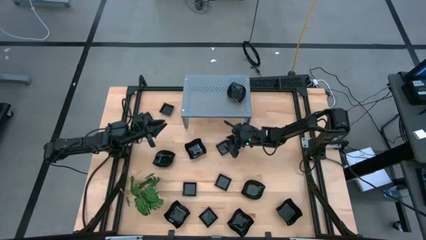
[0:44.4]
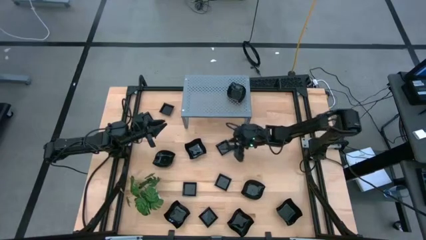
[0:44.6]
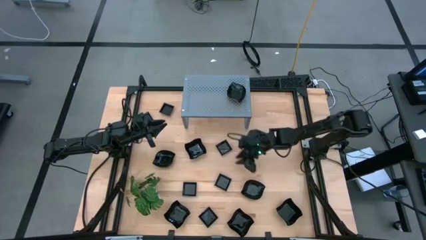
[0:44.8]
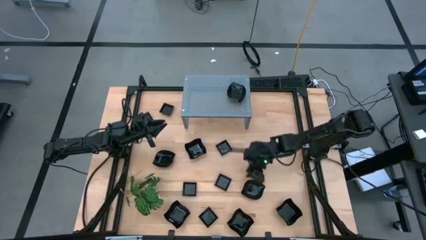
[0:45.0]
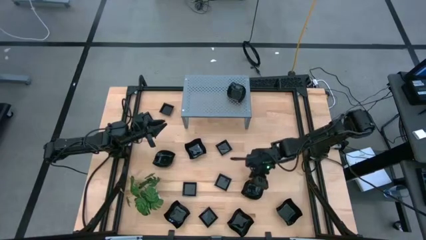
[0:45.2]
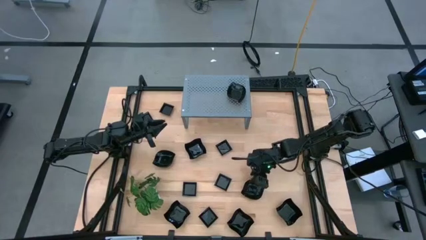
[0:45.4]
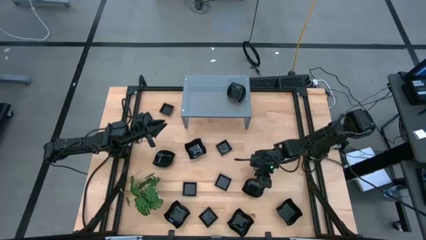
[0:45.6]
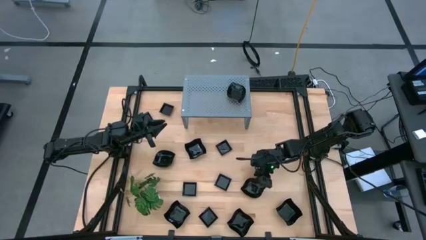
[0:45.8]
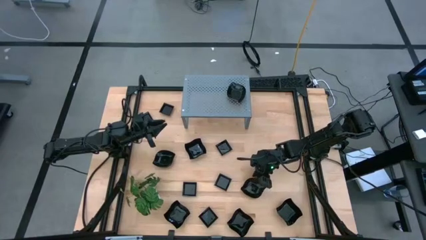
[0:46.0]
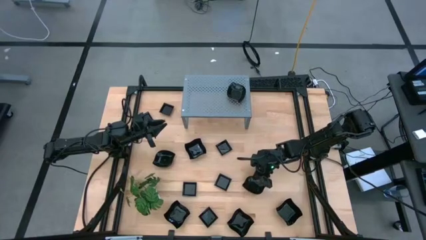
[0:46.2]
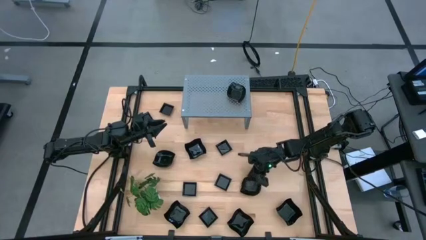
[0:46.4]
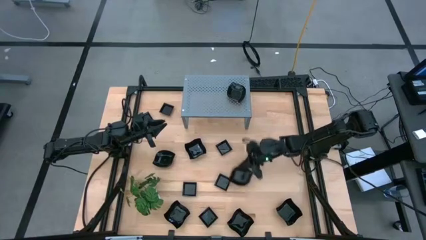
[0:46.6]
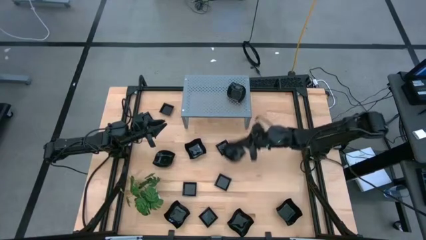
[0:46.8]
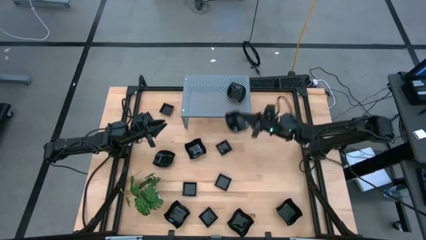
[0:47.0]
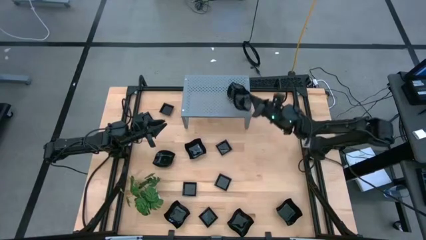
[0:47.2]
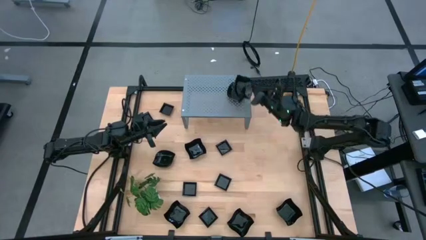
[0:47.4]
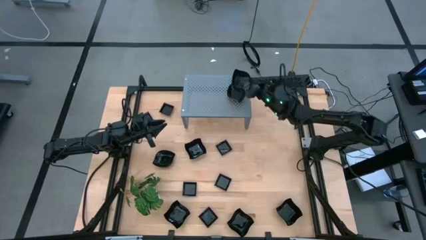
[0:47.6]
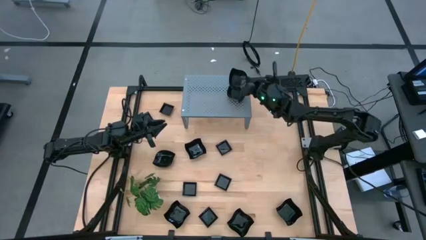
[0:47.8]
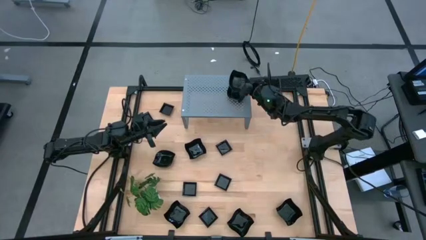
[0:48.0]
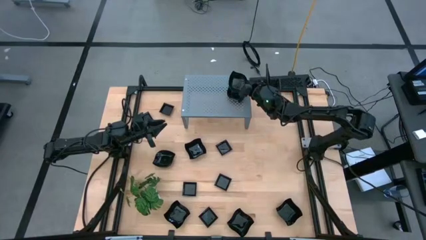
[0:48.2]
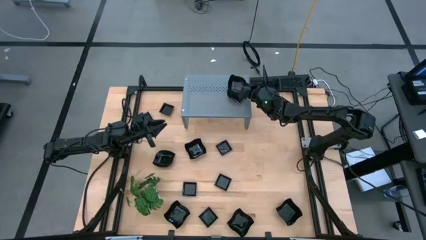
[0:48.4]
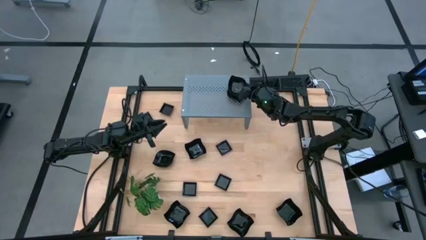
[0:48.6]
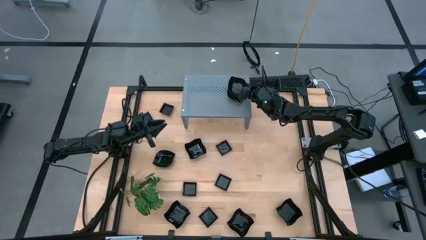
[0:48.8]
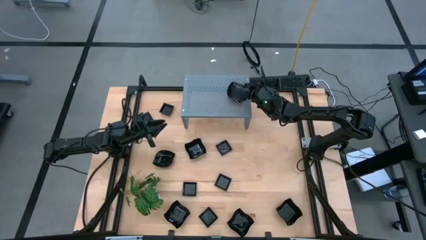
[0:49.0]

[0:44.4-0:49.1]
Task: Pick & Place Mini shaped plates
Stack the black leaf shaped plate on top of the black leaf shaped plates on the shelf

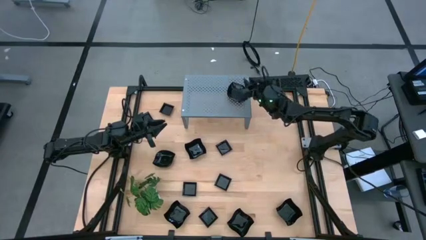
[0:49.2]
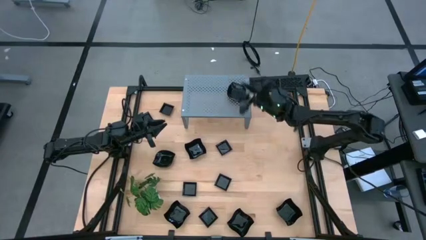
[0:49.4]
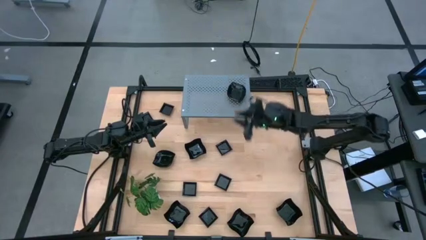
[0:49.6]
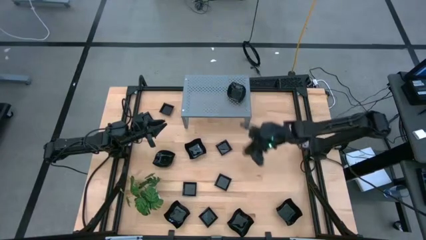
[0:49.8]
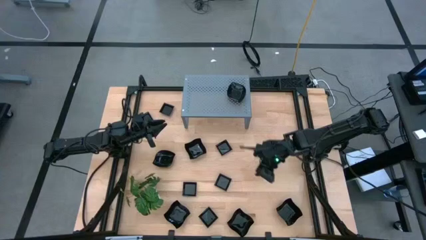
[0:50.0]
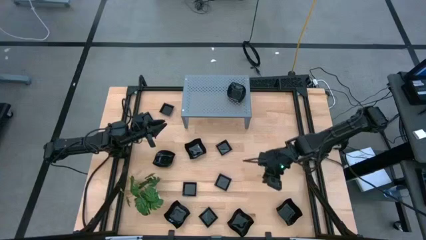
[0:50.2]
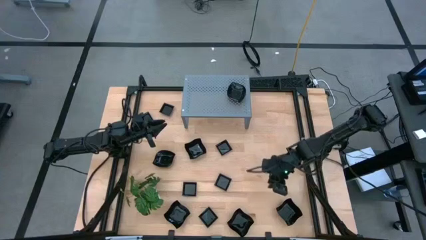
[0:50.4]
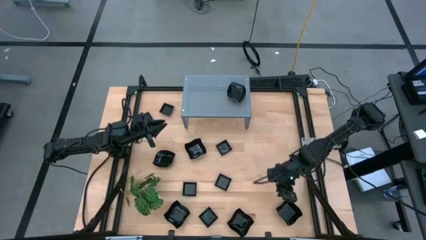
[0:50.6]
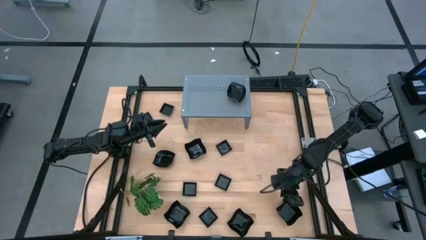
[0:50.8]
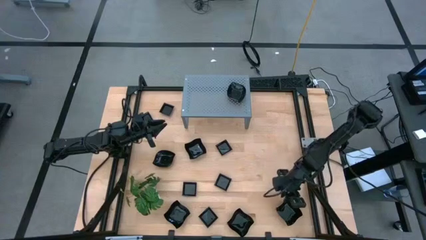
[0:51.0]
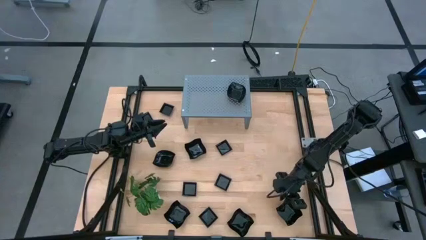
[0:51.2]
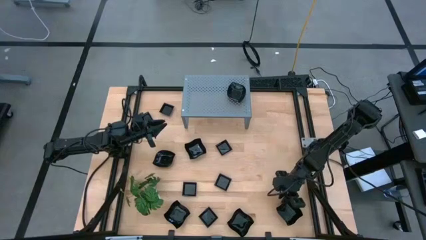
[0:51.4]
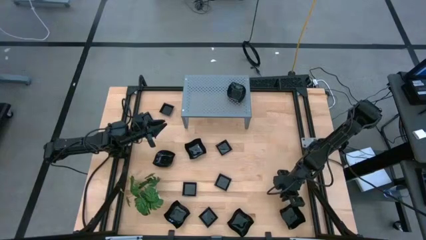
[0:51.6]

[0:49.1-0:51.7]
Move the black distorted square plate to the center of the table

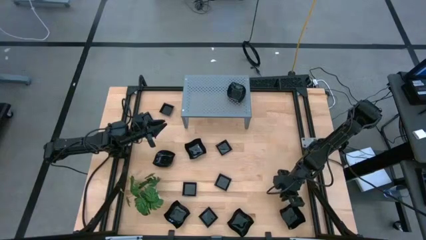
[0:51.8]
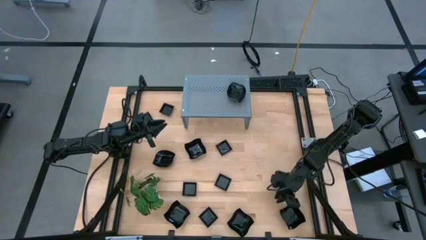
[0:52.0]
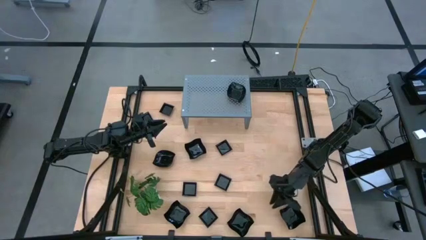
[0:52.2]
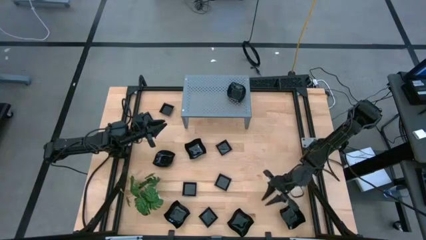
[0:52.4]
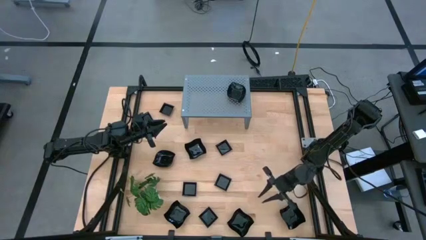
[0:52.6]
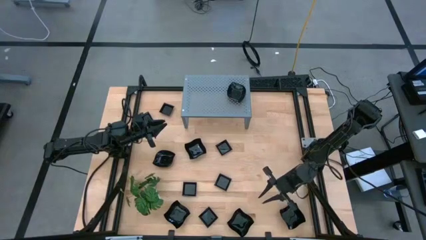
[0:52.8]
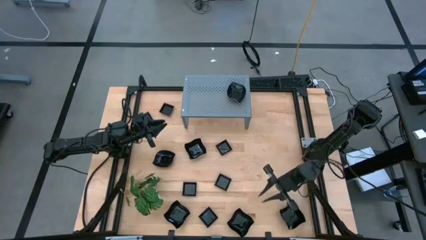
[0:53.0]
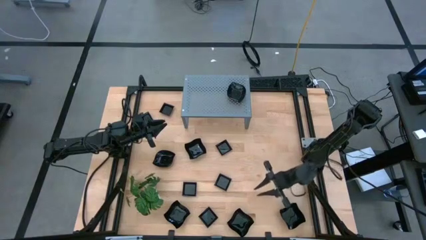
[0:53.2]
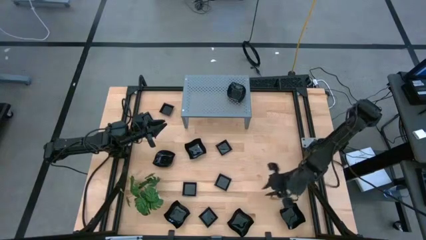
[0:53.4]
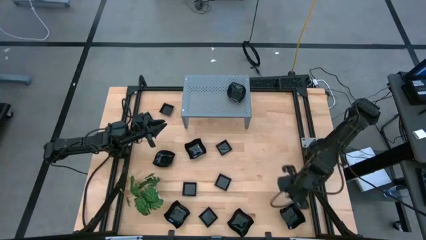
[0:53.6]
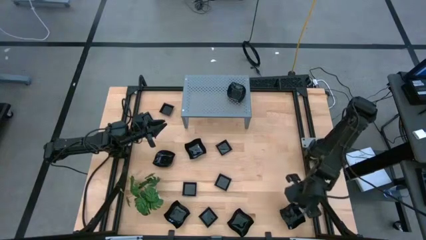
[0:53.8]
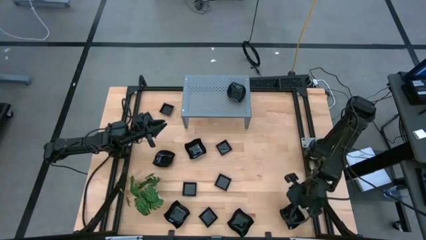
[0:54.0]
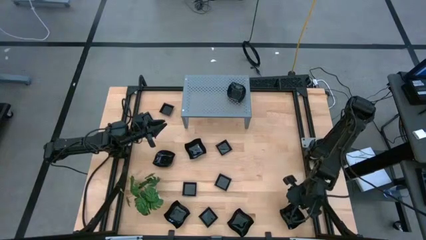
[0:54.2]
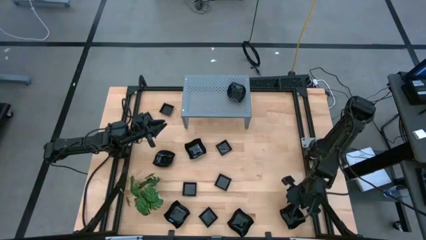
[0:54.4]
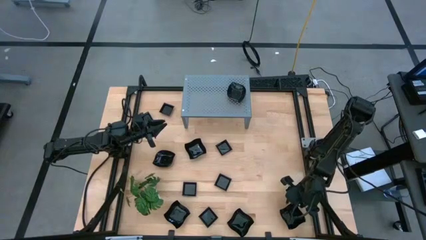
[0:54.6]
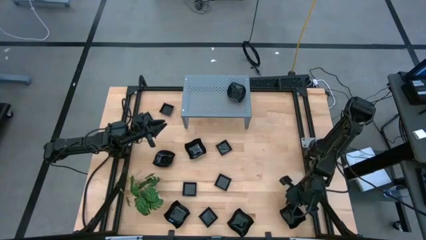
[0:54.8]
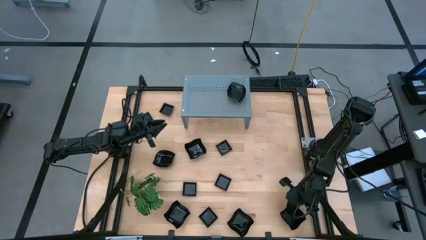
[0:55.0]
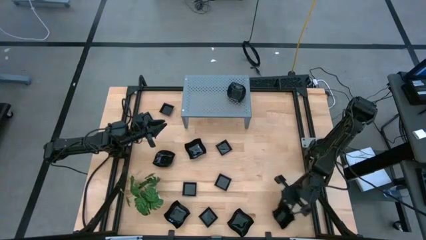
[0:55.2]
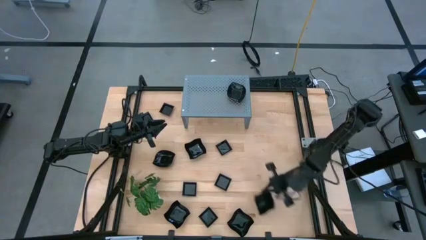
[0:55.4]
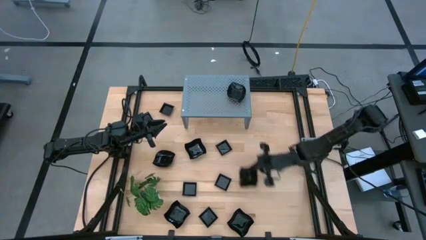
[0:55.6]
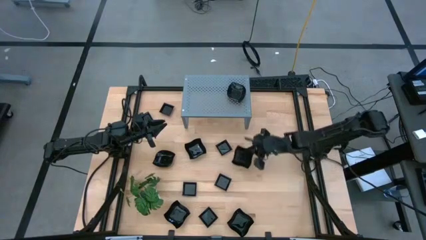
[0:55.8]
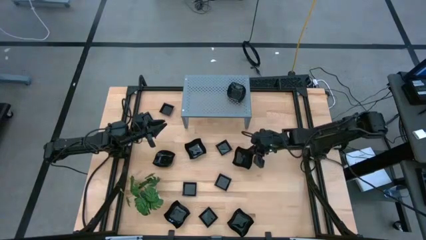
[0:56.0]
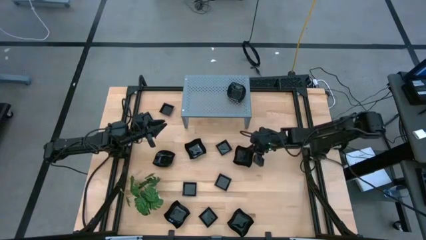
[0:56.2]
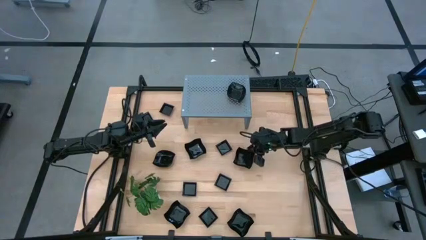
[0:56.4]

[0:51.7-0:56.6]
Move the black distorted square plate to the center of the table

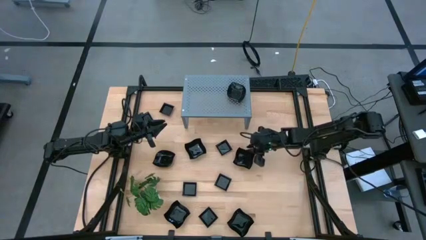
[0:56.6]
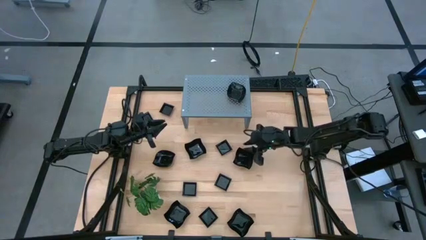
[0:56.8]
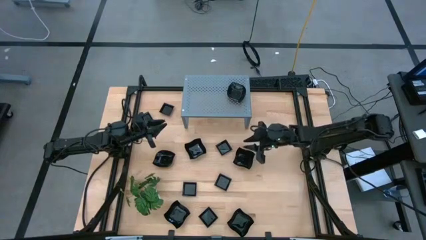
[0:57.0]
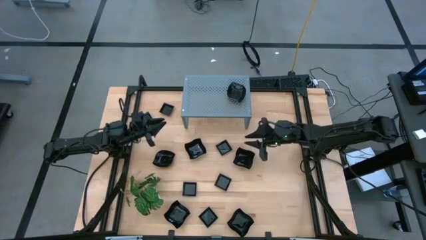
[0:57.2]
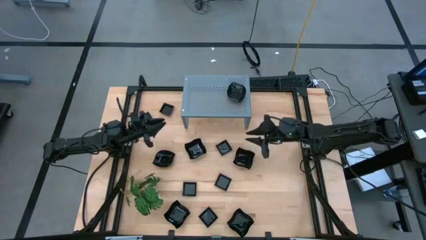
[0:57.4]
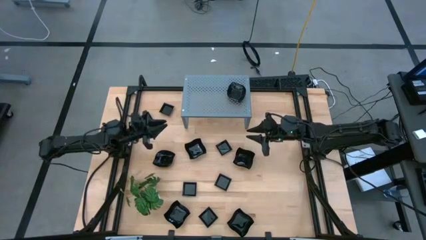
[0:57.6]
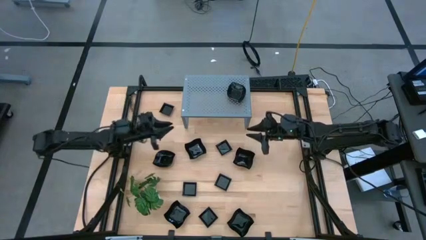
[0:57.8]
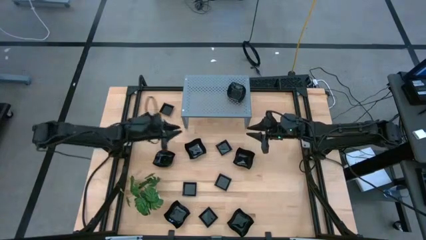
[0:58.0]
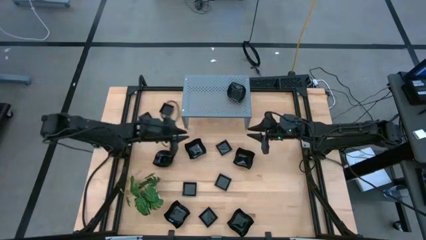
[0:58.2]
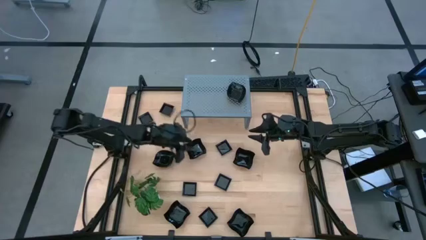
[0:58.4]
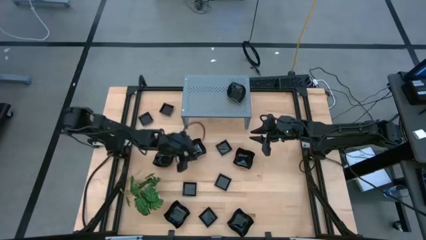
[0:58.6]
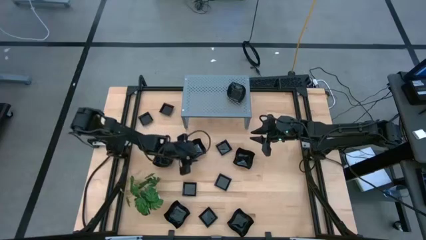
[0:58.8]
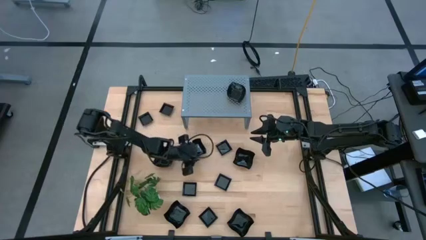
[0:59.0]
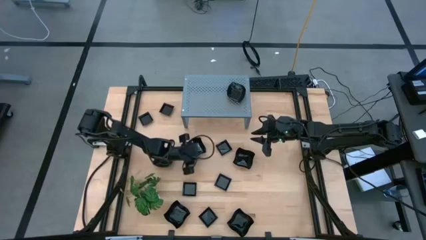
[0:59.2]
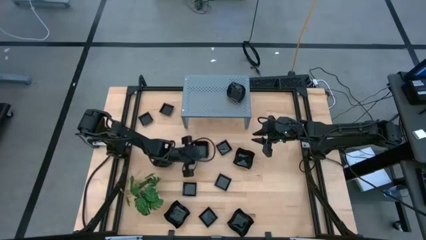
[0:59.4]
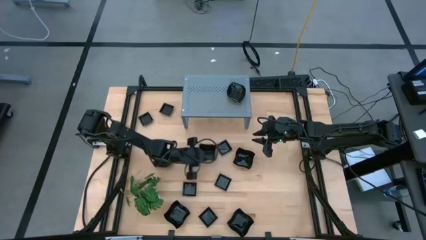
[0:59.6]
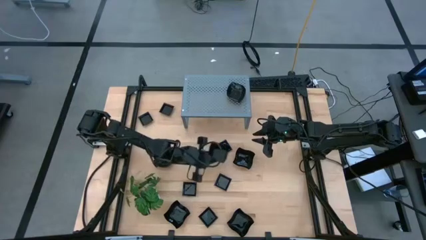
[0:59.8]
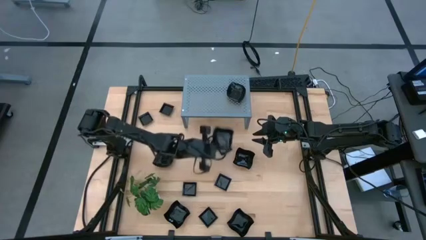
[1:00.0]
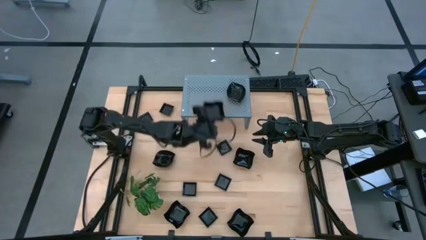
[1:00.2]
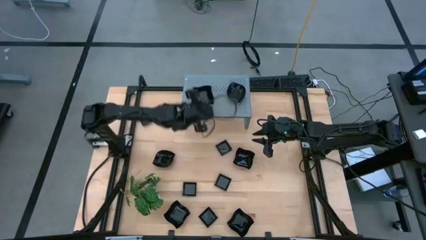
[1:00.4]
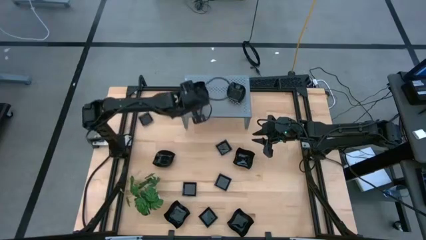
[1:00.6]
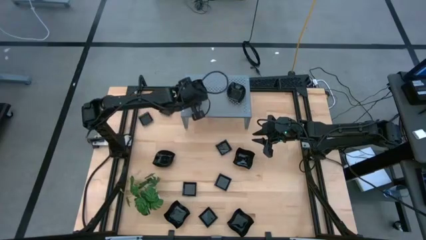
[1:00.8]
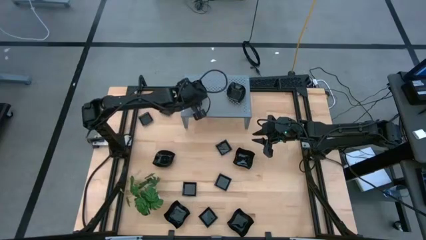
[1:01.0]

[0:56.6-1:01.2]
Put the black distorted square plate on the shelf
